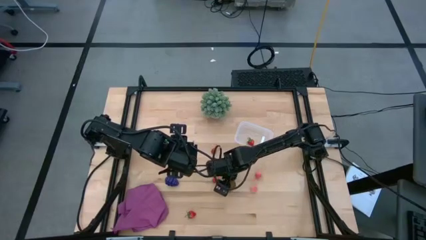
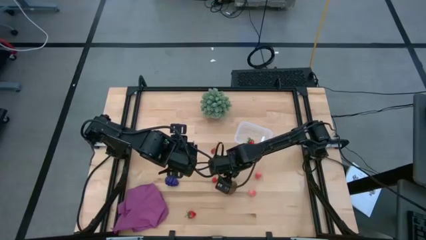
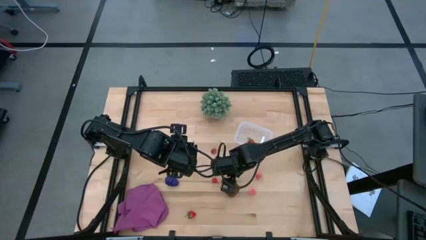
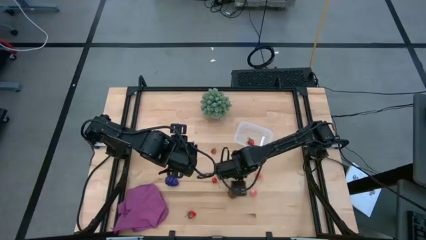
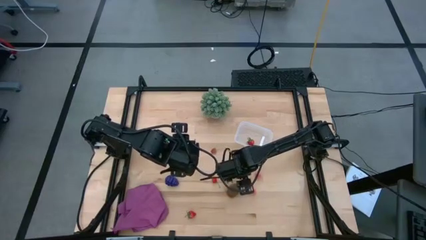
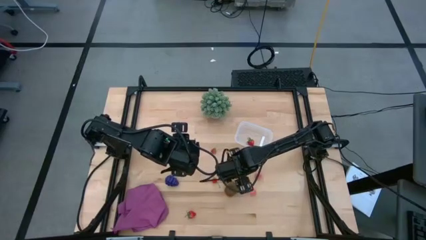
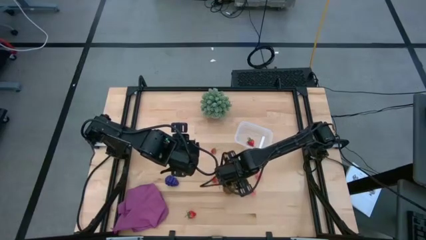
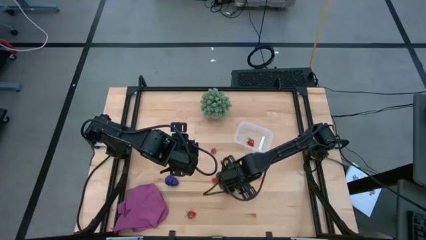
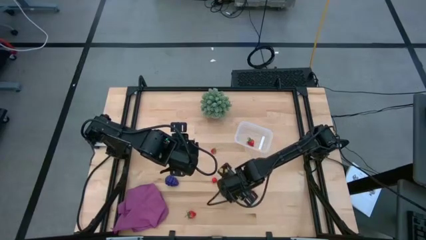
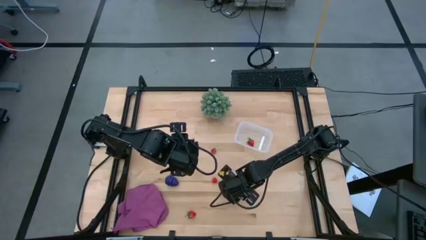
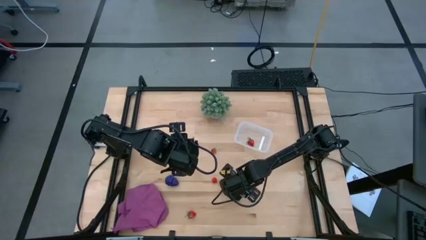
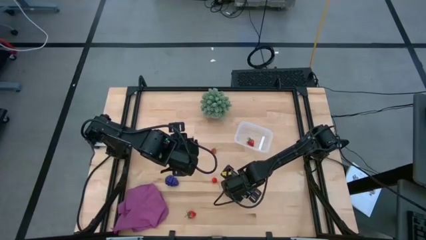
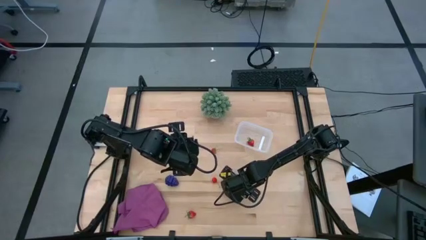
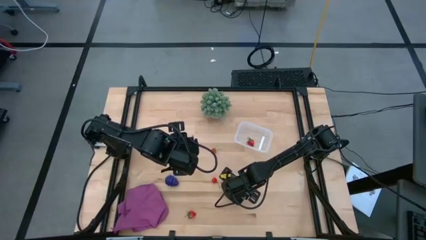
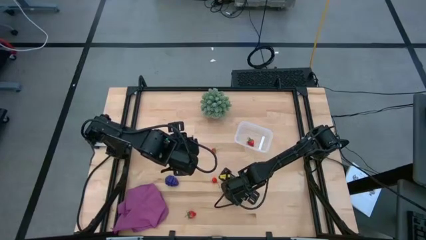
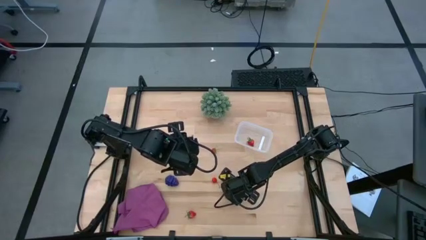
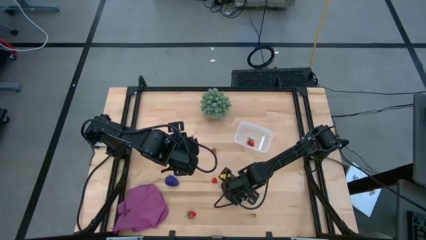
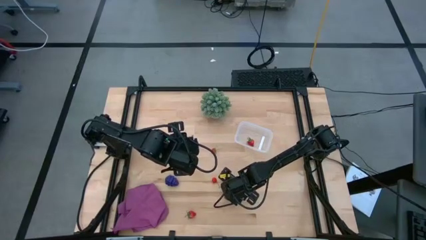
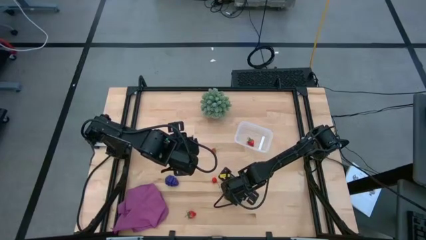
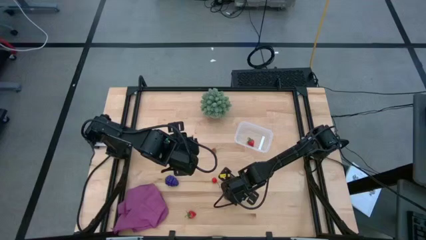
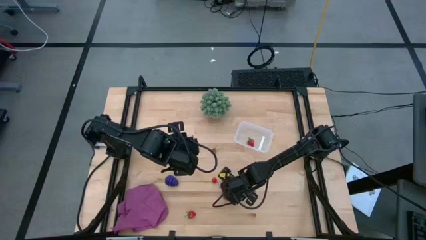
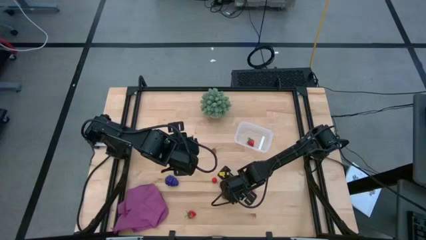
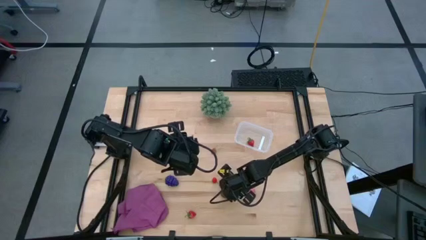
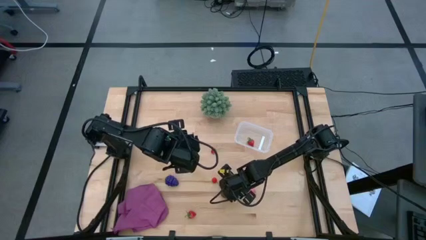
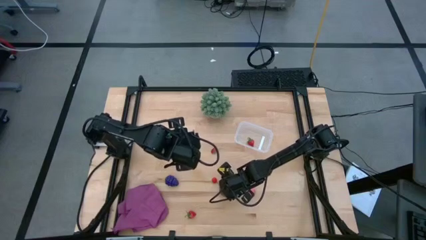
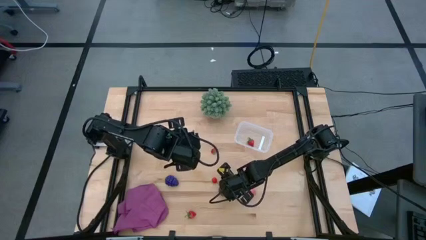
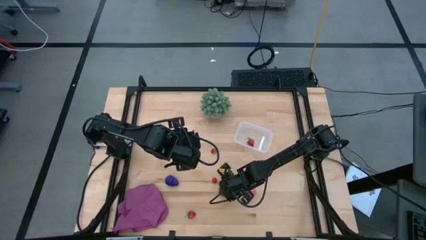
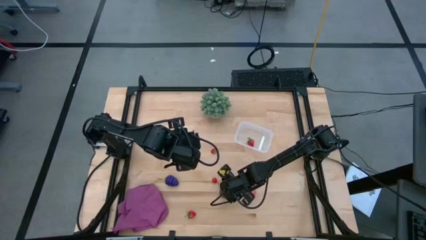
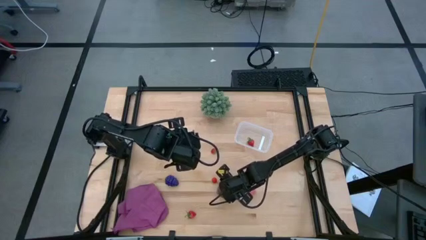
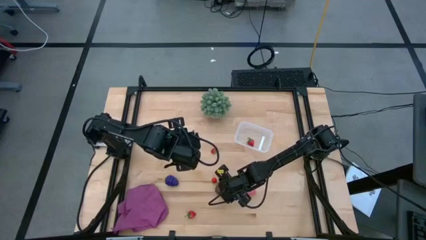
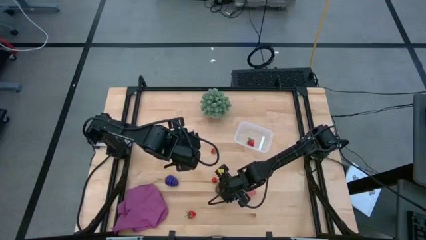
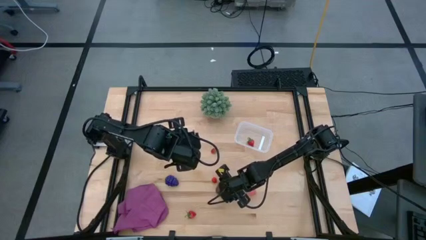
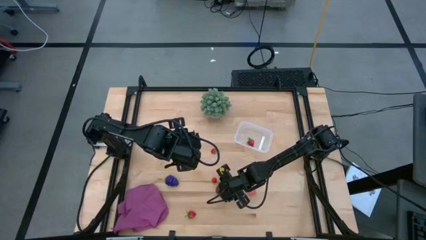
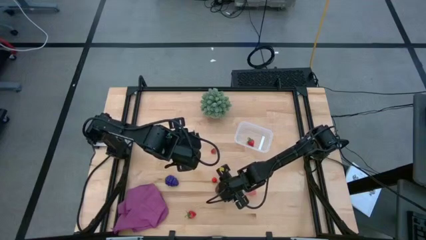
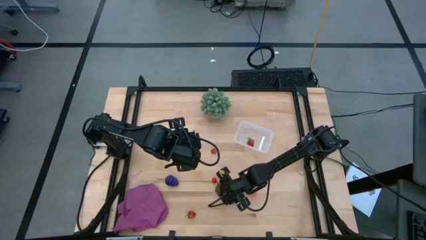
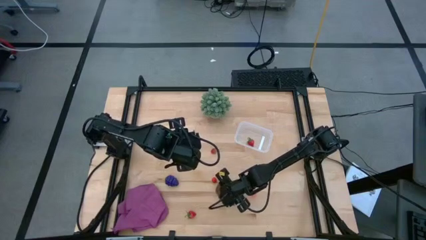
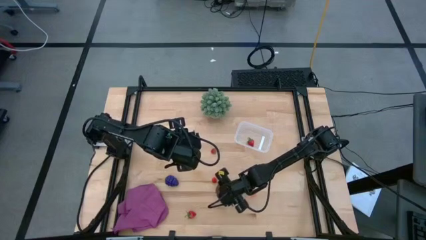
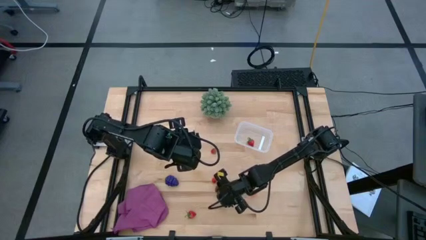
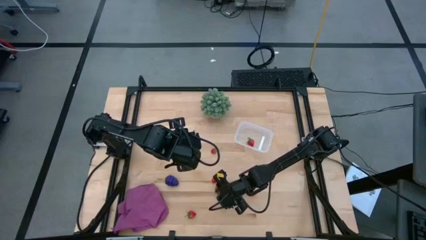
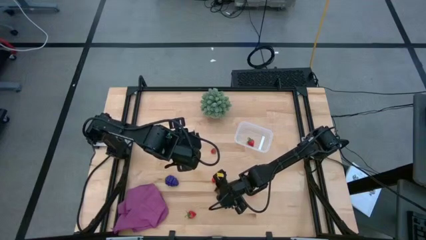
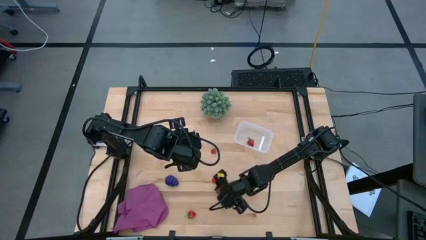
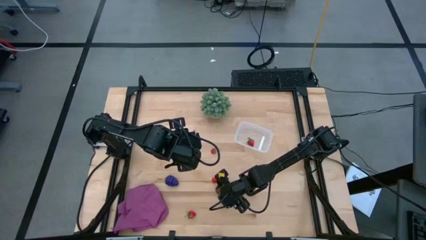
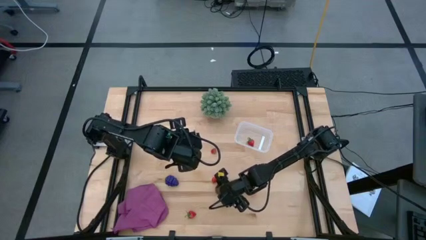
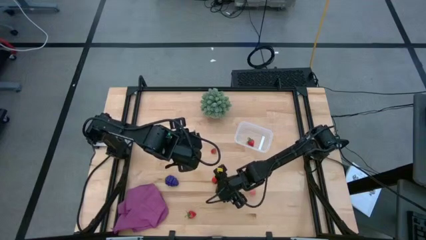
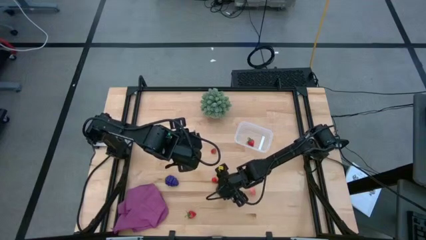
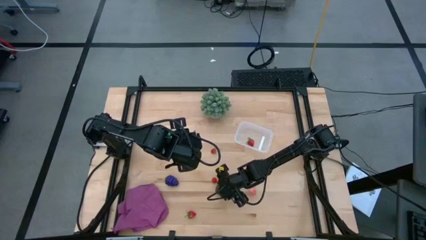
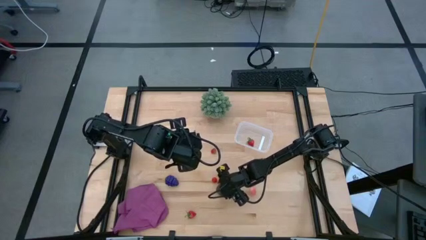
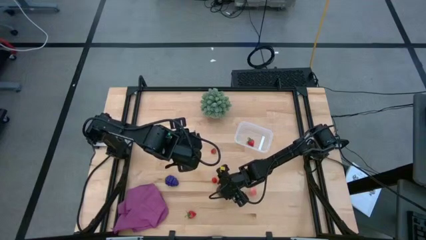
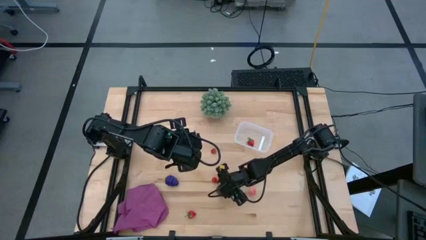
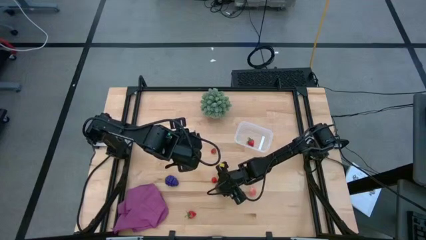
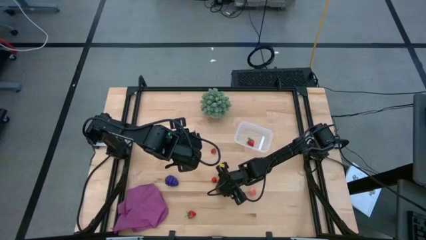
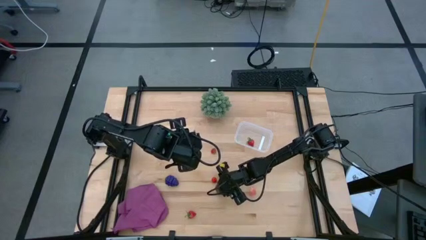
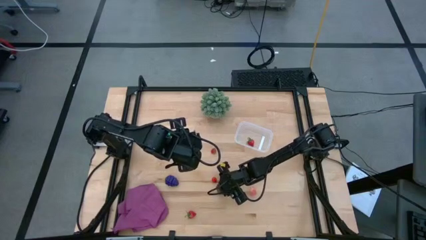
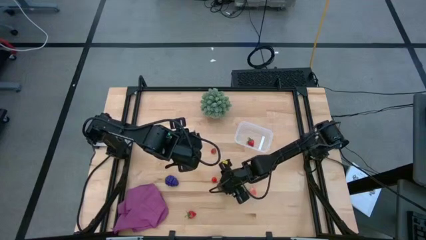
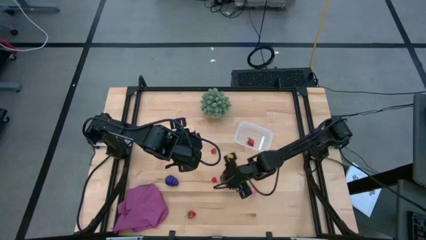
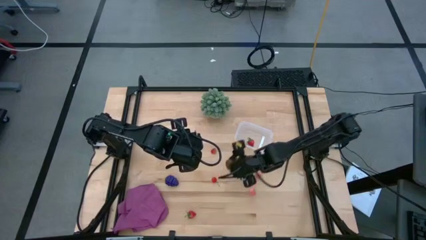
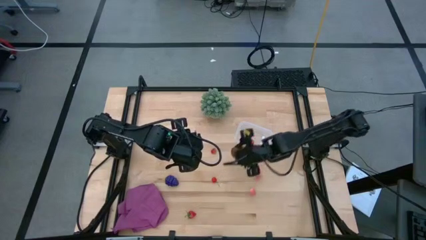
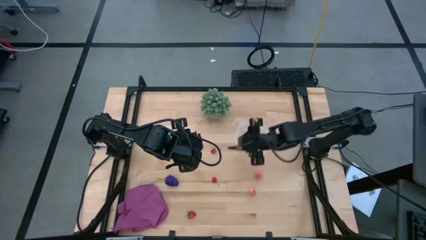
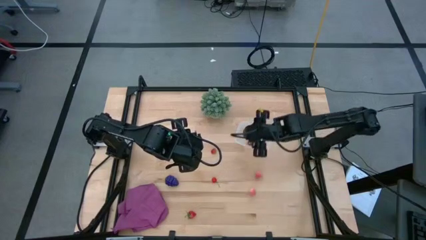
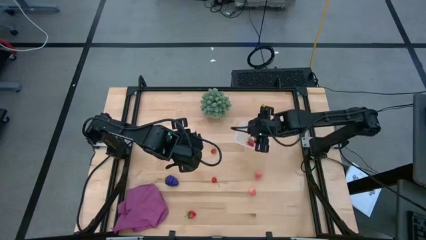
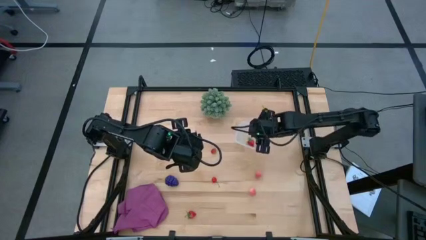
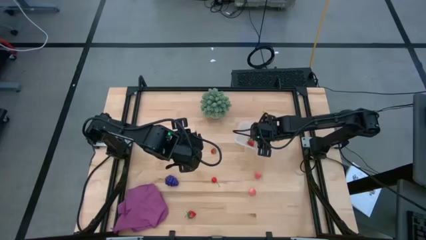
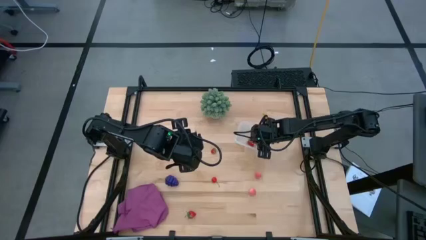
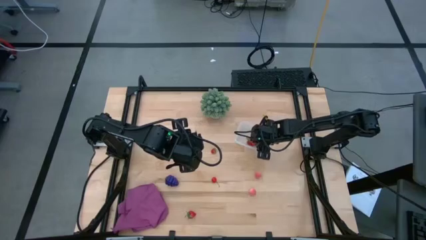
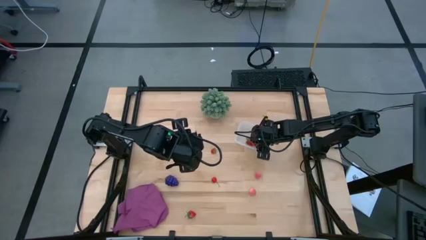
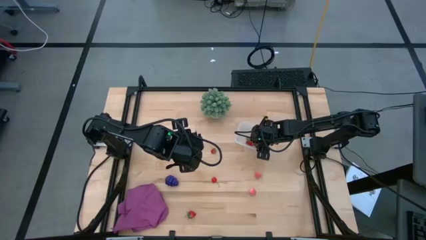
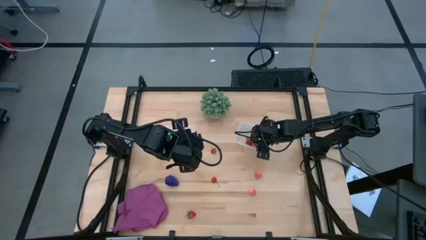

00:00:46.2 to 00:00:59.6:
Task: Pick and placing Produce into tupperware
Put the brown kiwi into the transparent bin

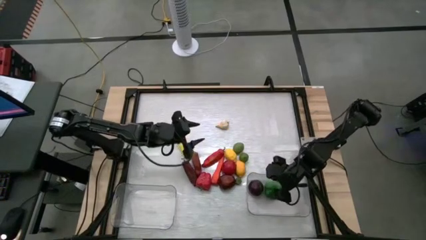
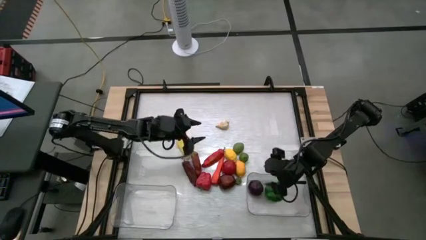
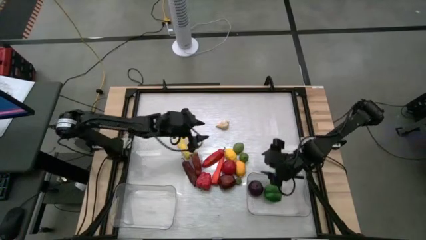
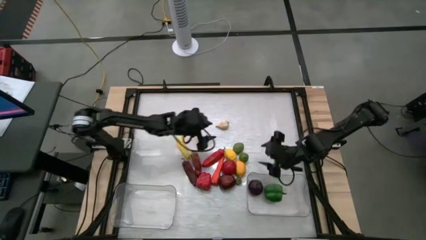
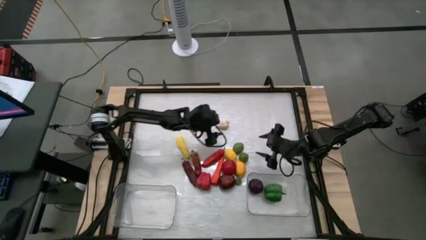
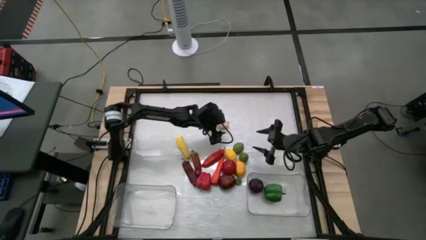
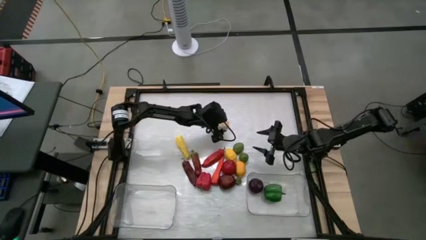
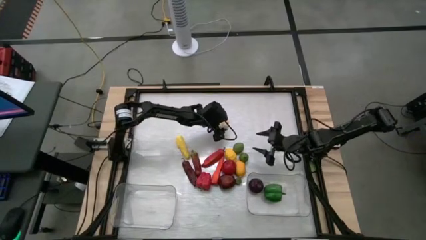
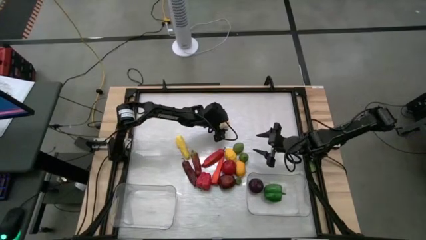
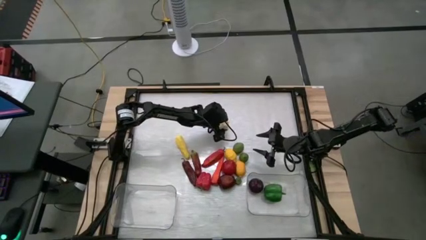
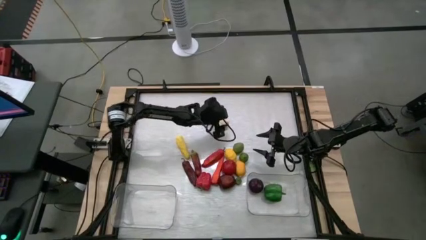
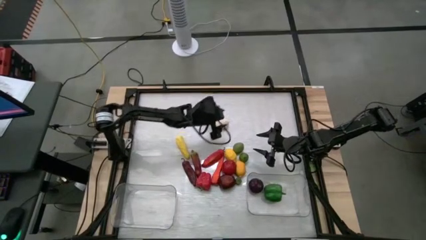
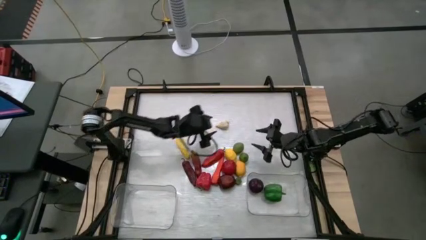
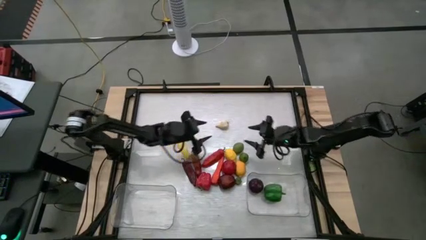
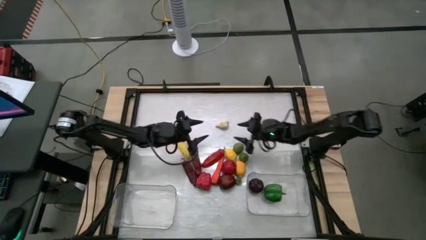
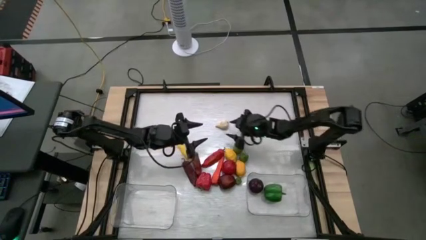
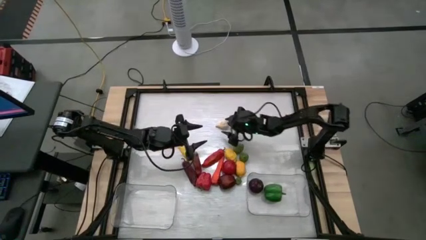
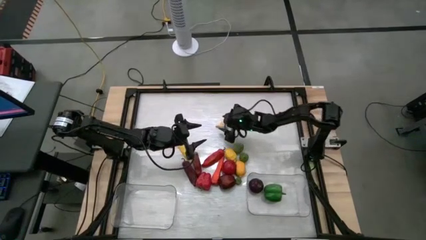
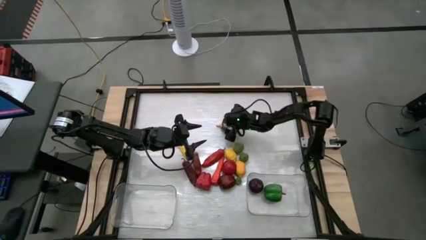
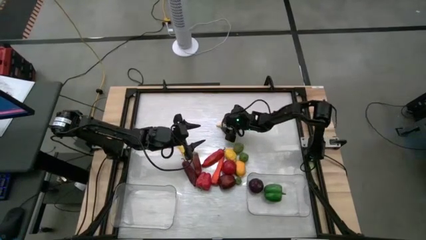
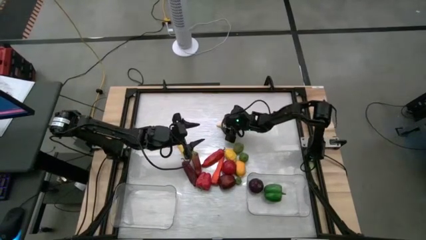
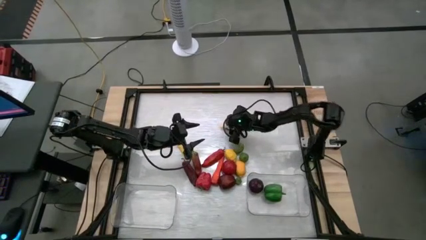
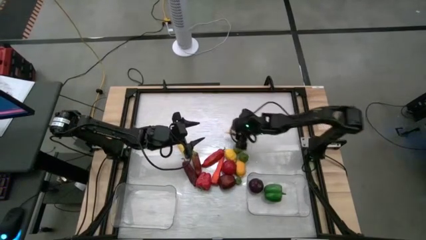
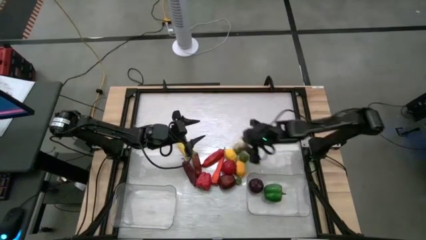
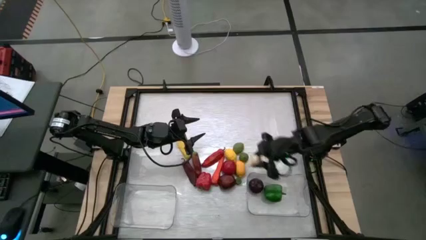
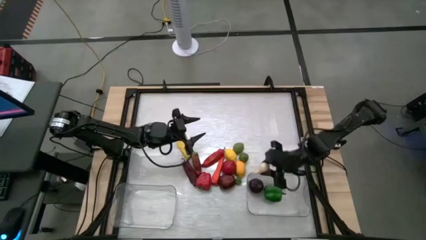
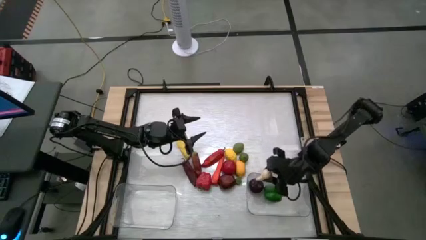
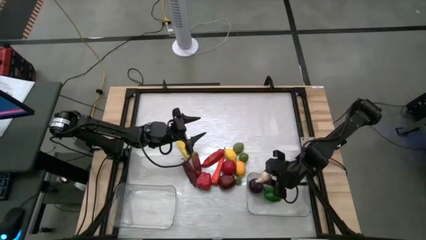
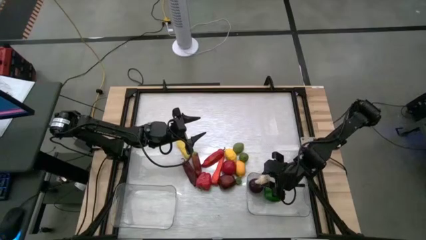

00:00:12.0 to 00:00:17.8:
Task: Sort produce into baskets
Put the garlic into the right transparent bin
